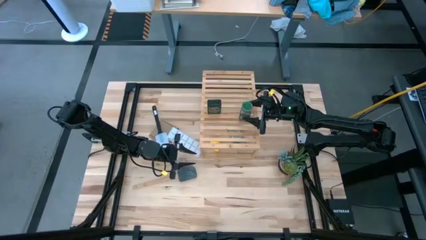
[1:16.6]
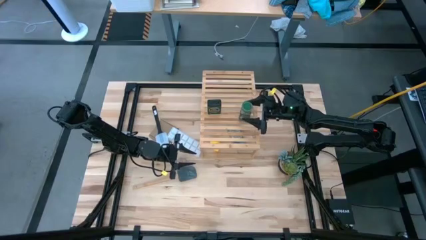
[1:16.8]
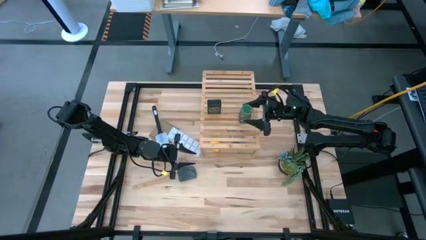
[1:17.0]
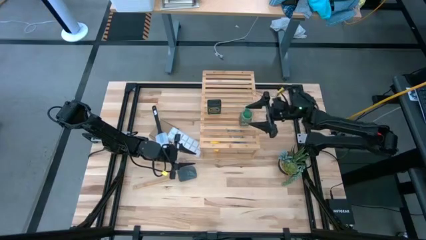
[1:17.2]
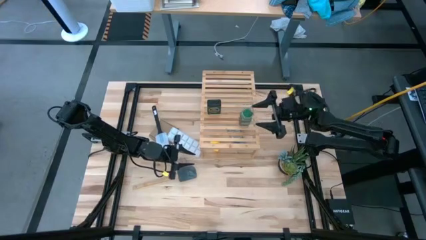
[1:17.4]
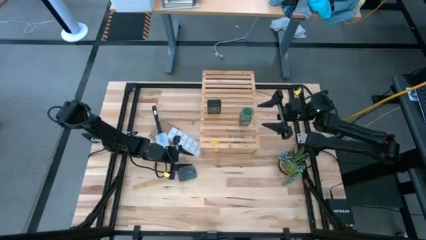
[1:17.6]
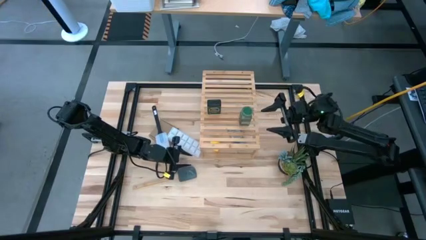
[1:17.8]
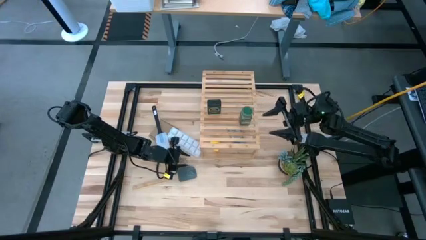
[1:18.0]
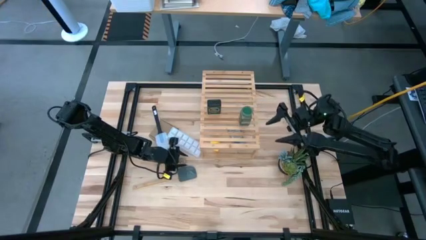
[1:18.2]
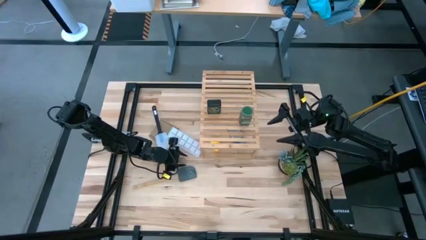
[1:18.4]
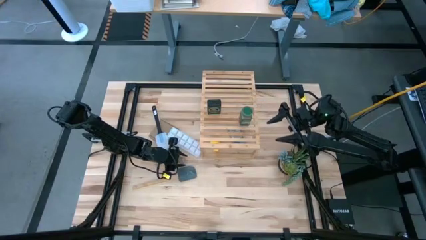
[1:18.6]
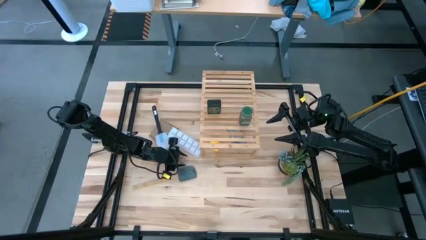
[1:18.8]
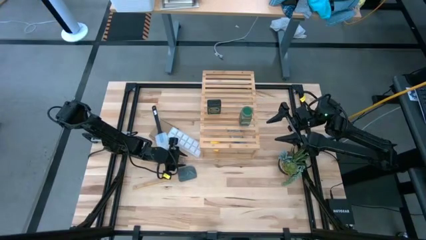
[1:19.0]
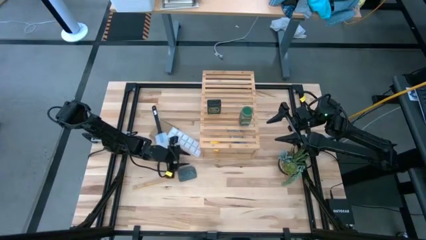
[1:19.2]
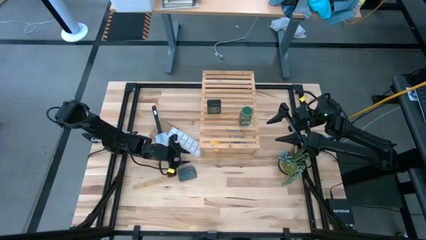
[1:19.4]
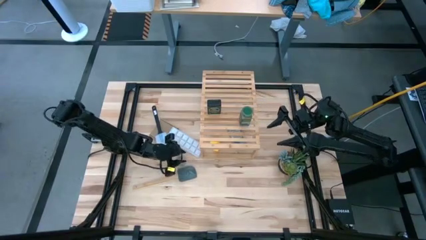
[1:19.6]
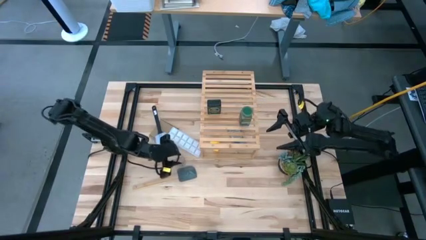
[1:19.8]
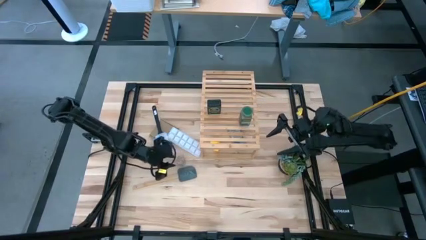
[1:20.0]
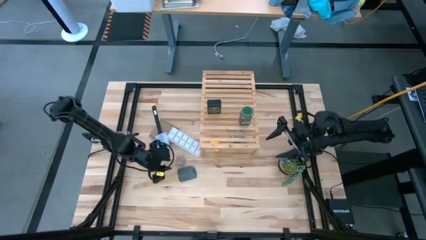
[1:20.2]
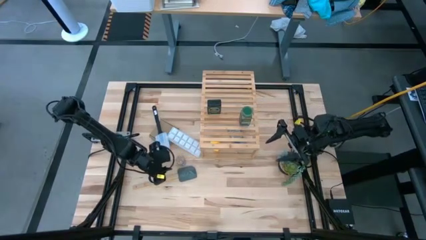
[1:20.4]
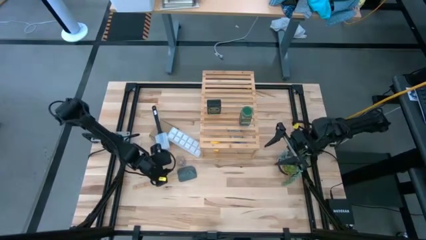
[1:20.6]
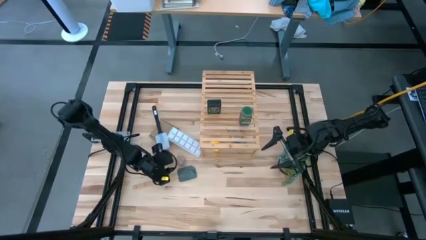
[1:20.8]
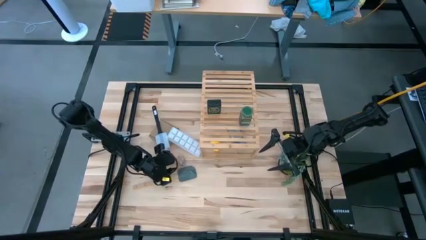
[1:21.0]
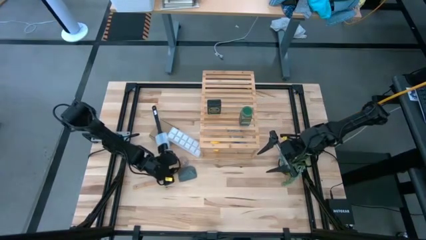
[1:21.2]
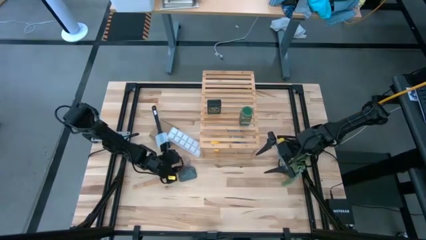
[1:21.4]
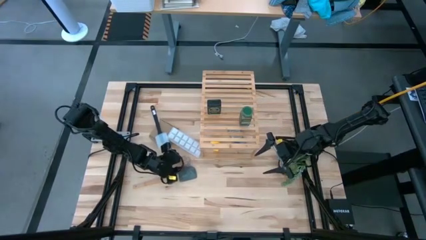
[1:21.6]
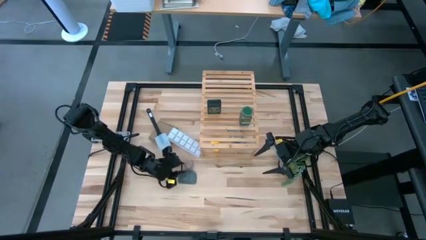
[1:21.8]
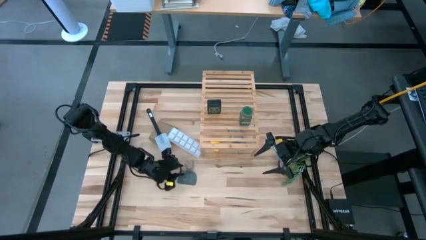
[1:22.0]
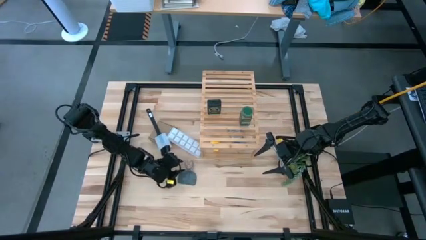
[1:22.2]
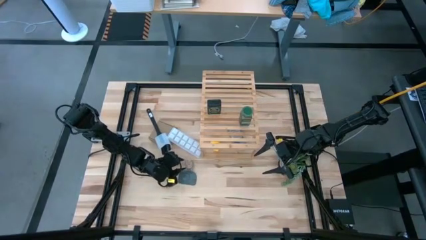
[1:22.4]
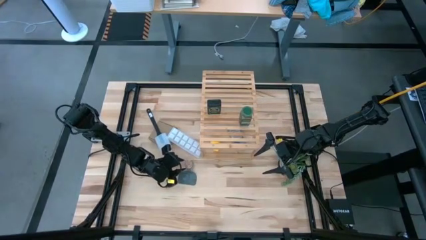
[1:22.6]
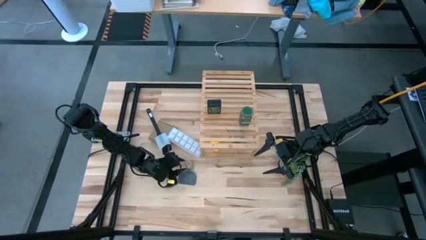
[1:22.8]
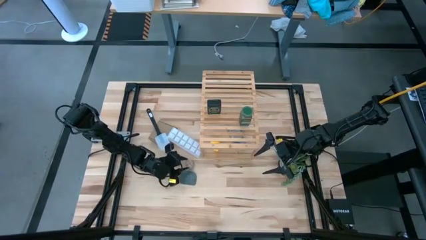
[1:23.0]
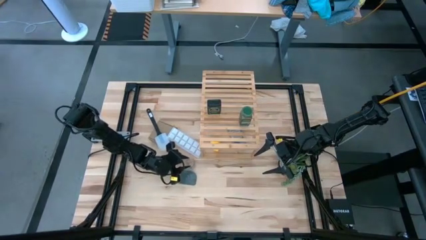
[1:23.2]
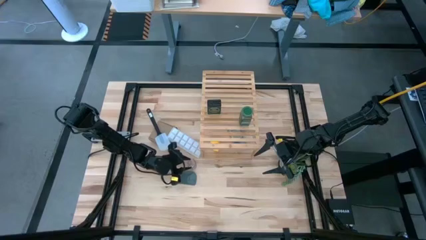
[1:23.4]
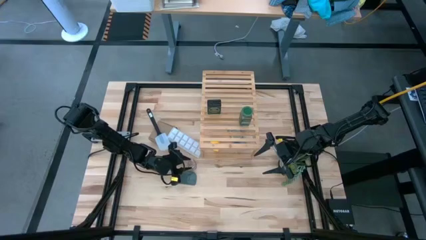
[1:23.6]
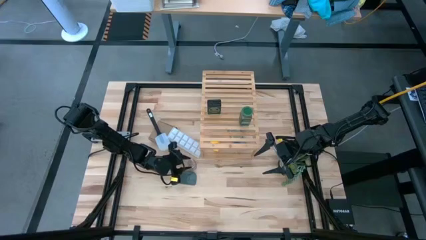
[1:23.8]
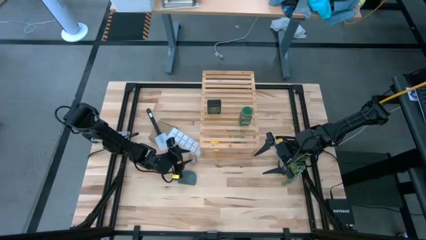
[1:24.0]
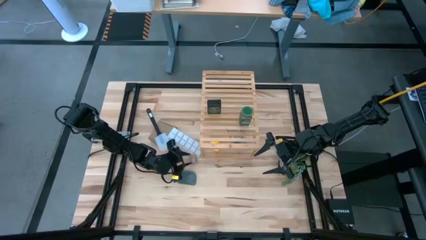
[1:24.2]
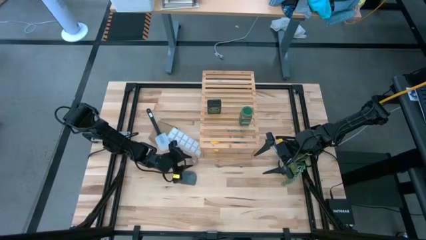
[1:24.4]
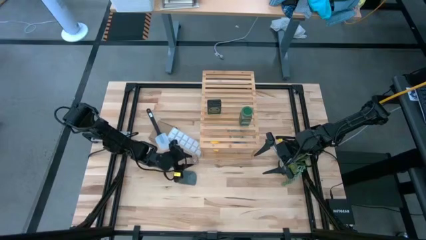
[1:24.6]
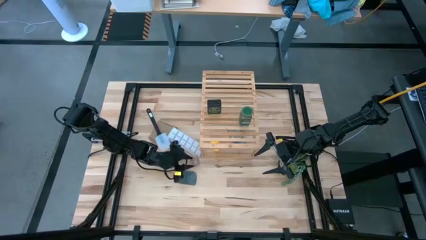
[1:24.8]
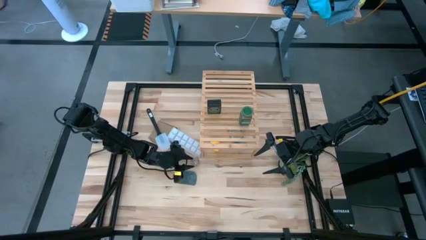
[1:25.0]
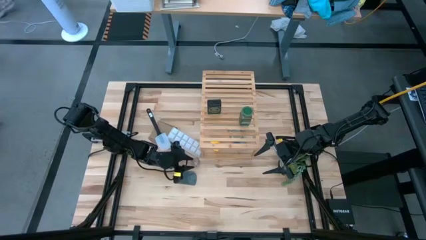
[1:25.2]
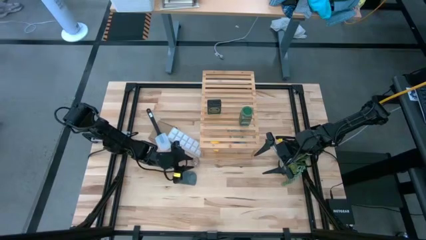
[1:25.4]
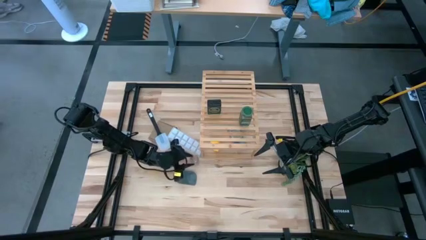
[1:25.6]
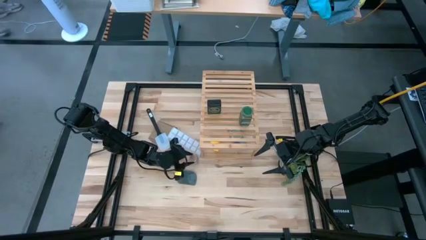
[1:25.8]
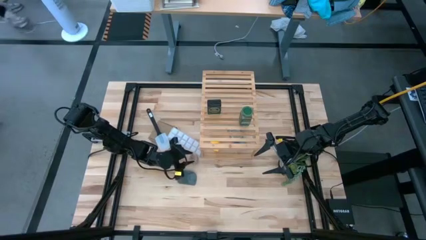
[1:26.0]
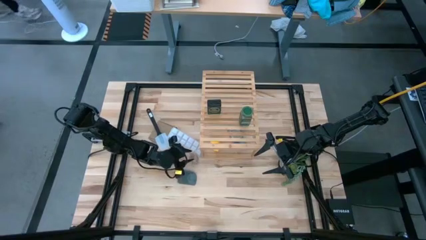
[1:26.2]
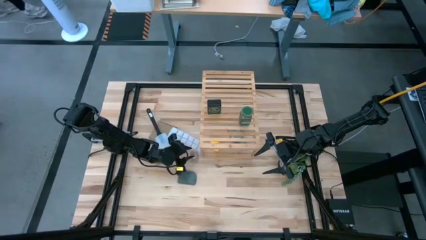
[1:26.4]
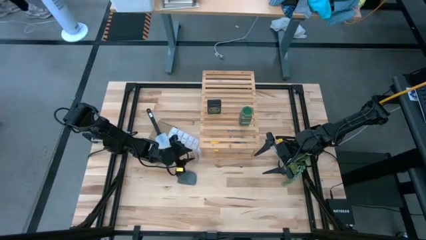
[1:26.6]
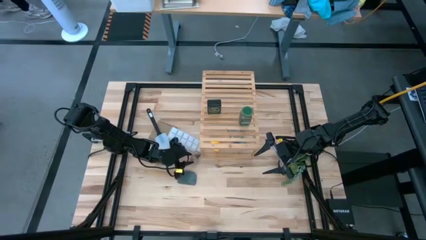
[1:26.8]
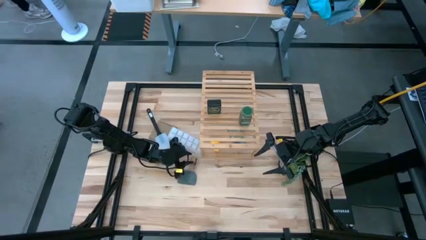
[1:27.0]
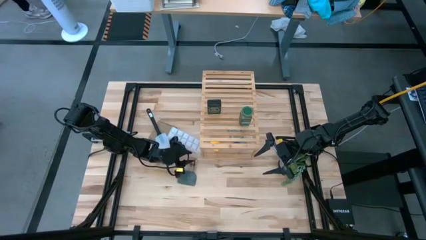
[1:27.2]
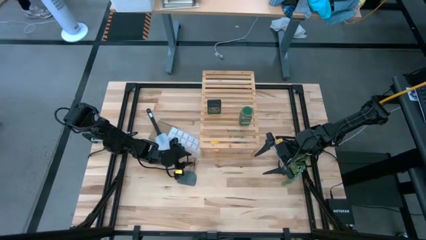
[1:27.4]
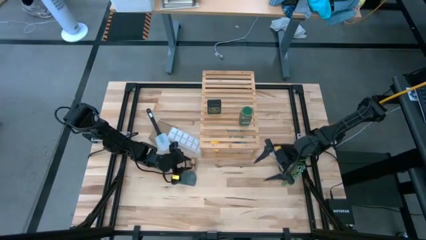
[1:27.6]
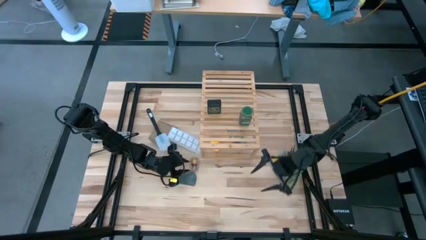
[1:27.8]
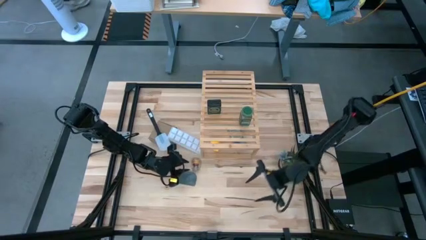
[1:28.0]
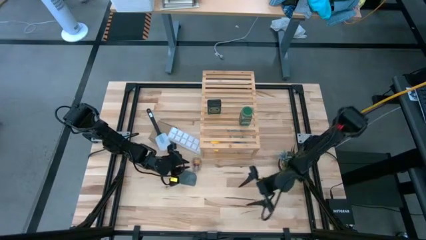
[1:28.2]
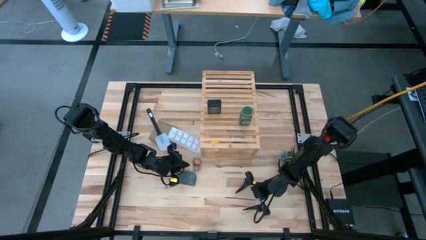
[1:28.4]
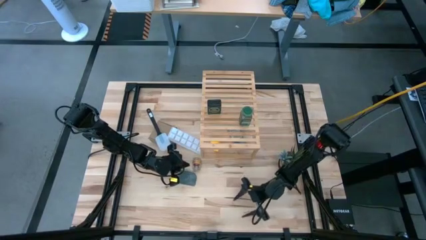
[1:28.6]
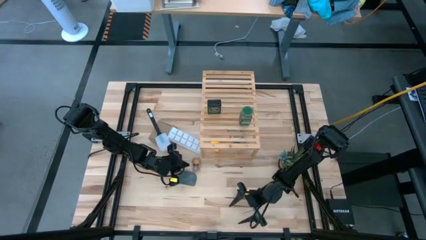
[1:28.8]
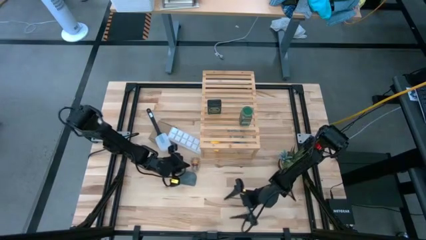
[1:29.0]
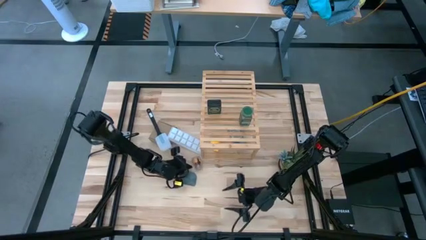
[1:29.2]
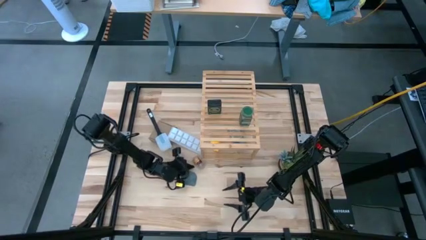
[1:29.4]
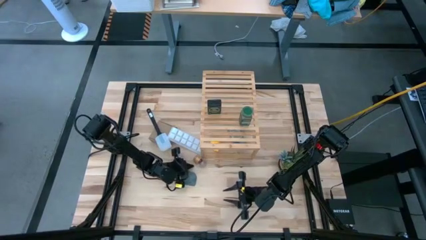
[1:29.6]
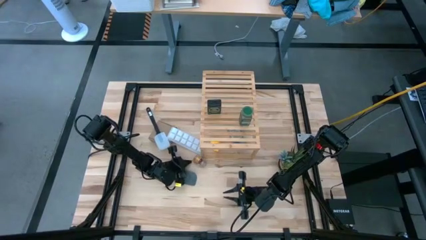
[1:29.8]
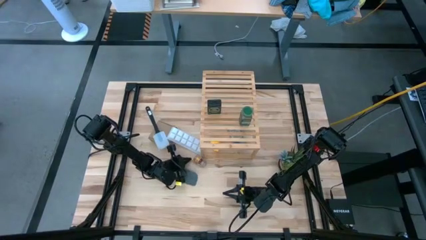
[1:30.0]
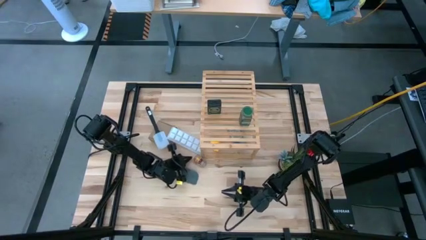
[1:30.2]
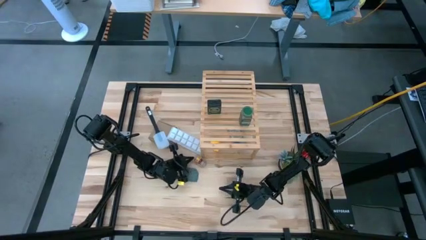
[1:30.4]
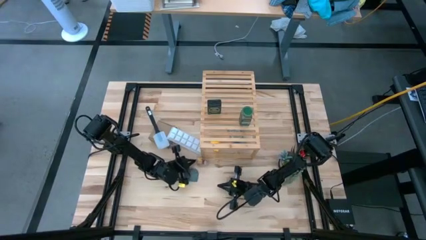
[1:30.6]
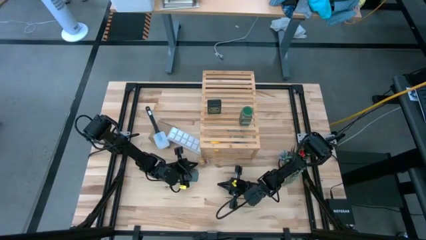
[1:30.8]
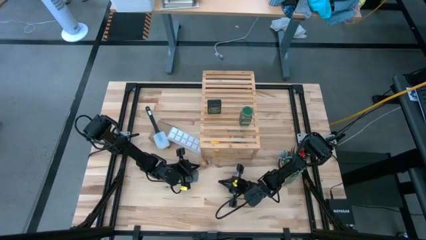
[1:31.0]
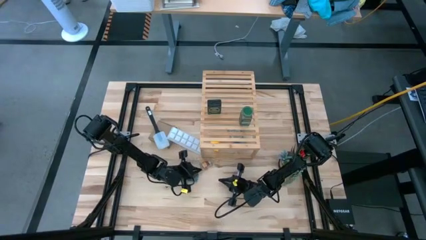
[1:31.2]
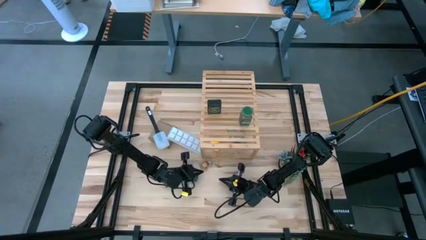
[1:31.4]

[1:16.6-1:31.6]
Task: Shelf spices
Put the brown seasoning bottle on the shelf
